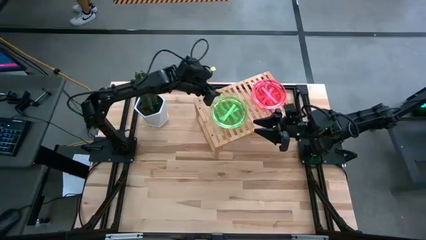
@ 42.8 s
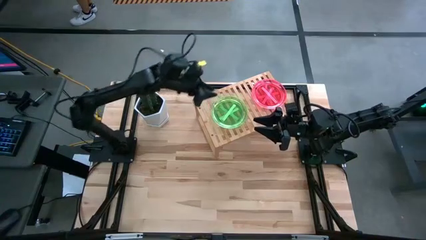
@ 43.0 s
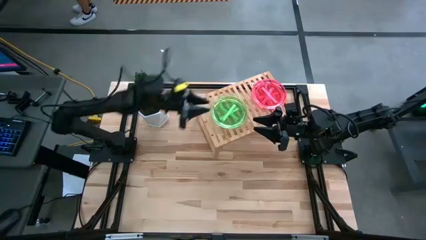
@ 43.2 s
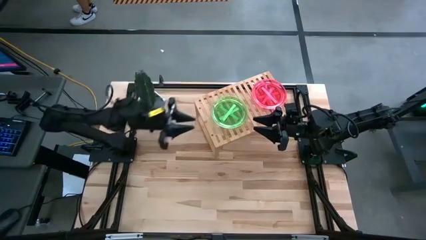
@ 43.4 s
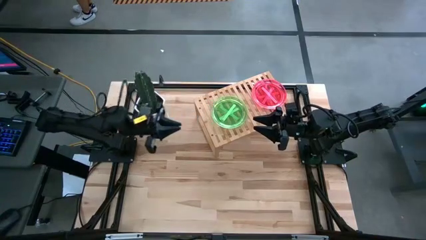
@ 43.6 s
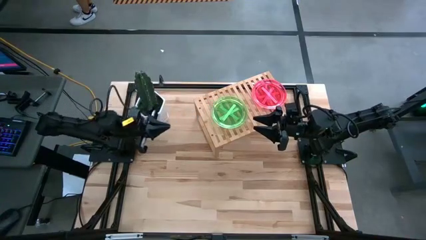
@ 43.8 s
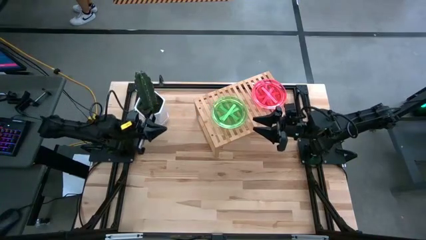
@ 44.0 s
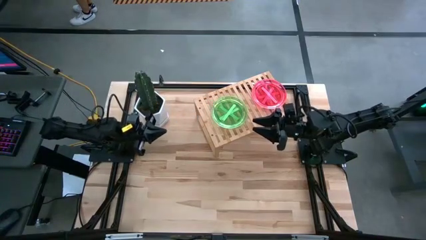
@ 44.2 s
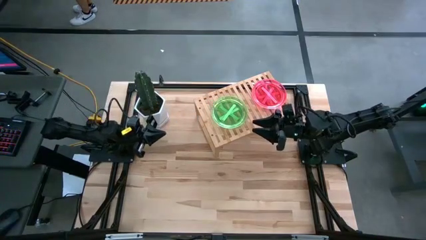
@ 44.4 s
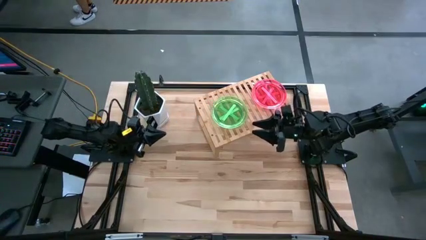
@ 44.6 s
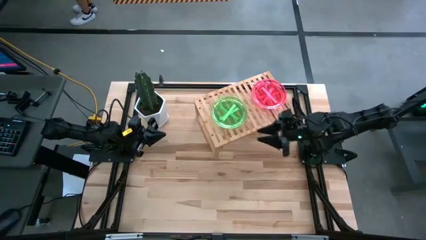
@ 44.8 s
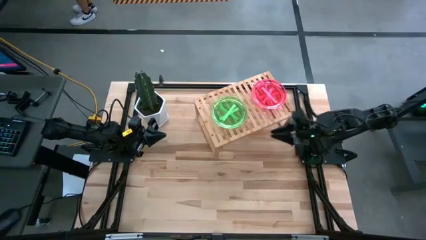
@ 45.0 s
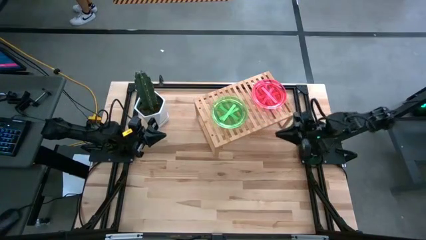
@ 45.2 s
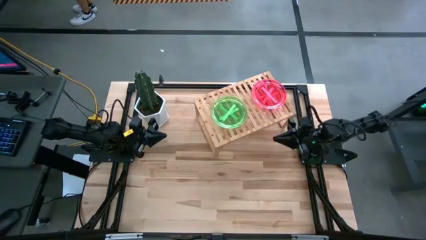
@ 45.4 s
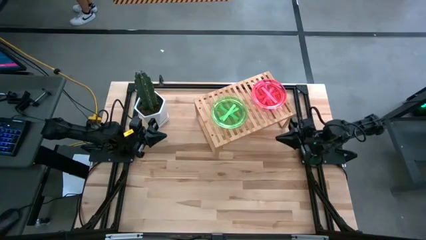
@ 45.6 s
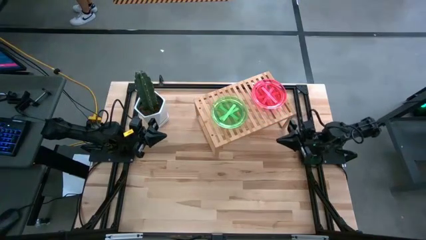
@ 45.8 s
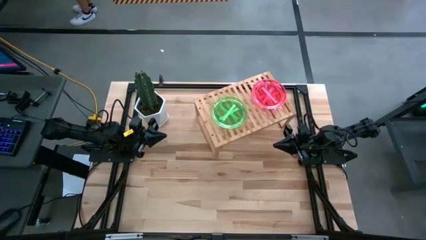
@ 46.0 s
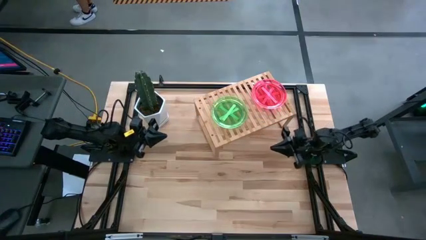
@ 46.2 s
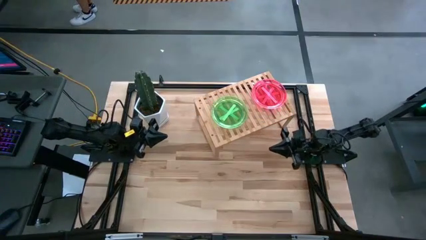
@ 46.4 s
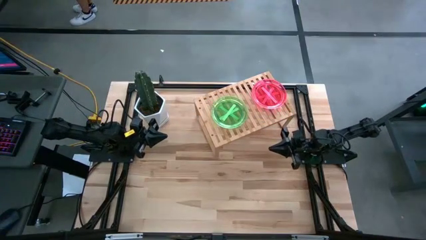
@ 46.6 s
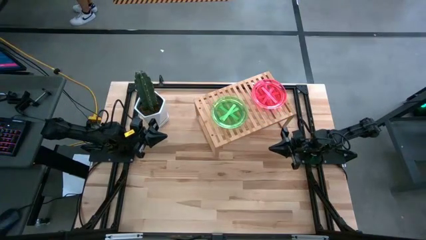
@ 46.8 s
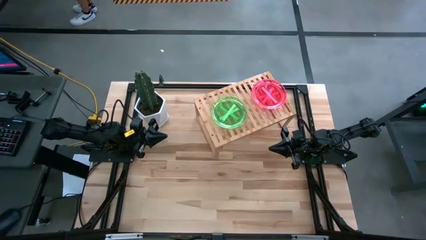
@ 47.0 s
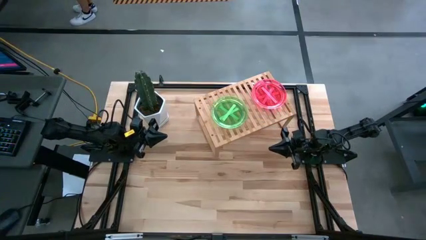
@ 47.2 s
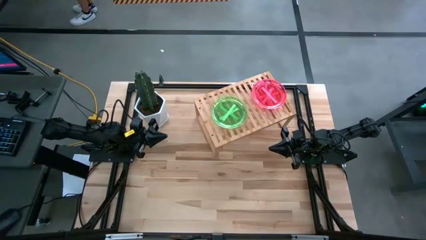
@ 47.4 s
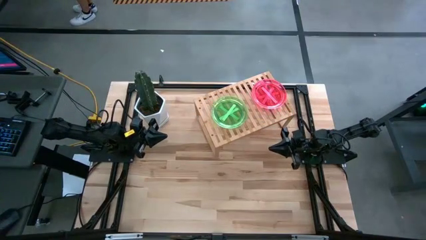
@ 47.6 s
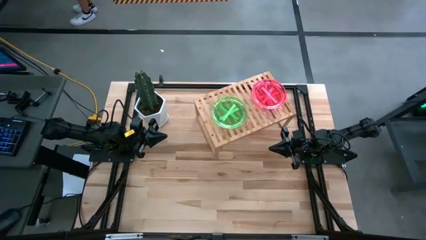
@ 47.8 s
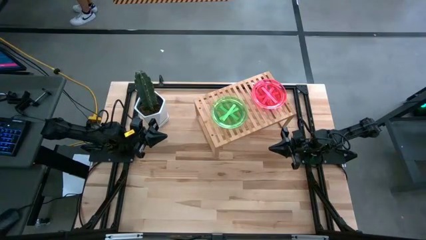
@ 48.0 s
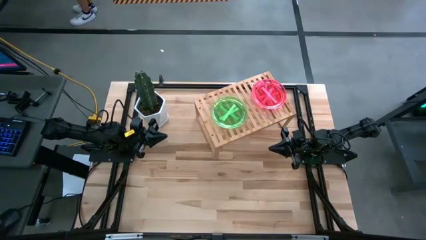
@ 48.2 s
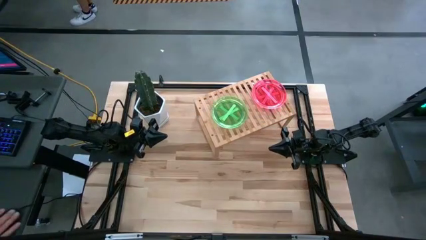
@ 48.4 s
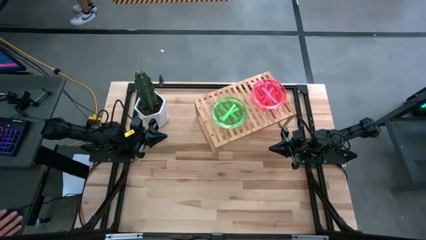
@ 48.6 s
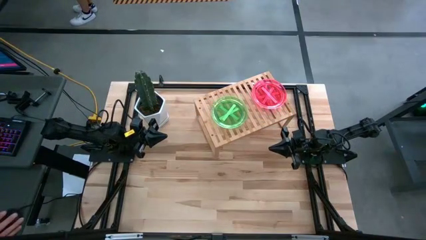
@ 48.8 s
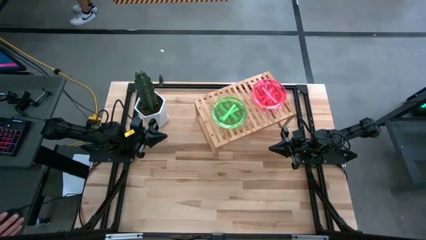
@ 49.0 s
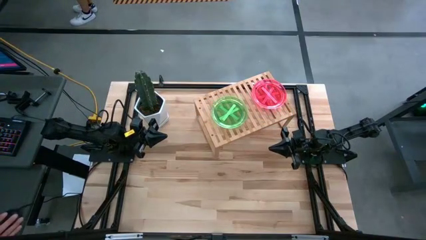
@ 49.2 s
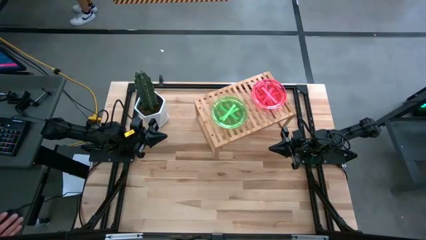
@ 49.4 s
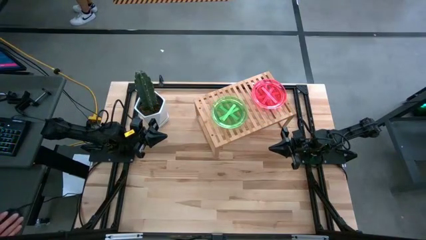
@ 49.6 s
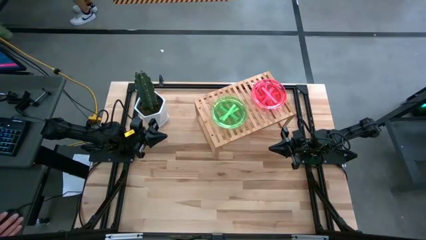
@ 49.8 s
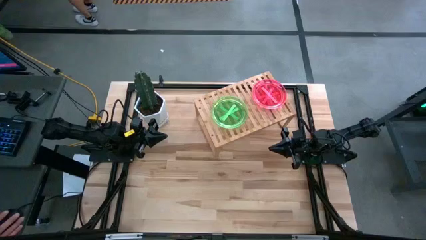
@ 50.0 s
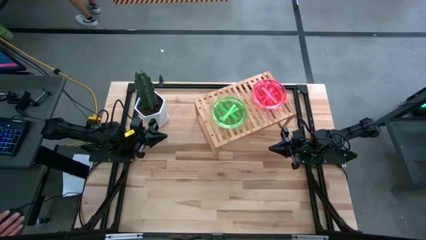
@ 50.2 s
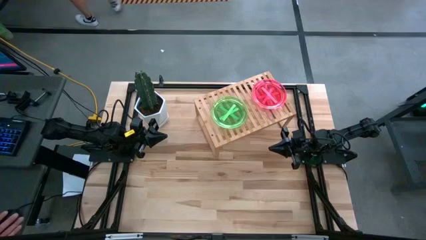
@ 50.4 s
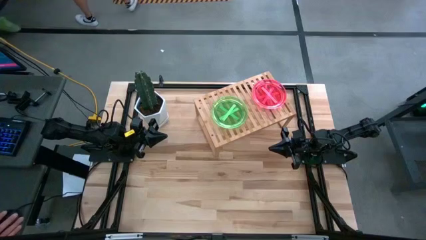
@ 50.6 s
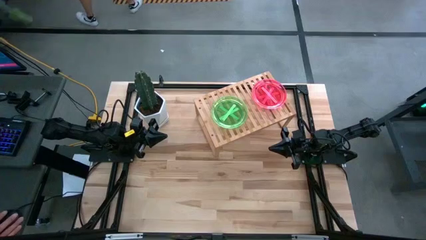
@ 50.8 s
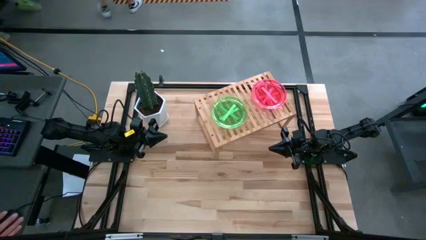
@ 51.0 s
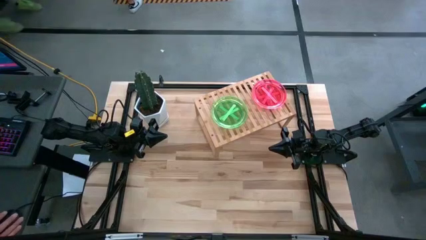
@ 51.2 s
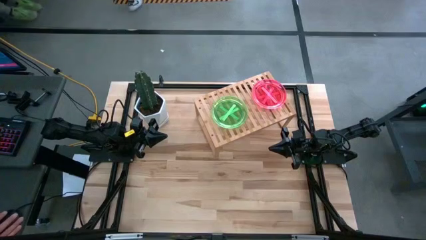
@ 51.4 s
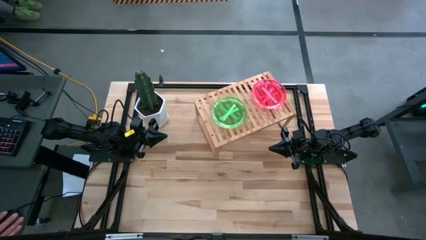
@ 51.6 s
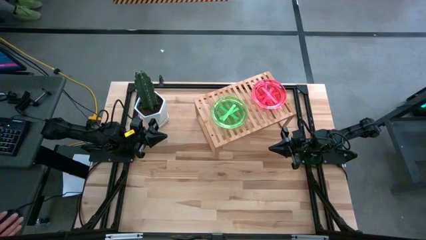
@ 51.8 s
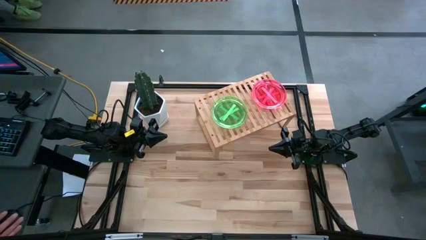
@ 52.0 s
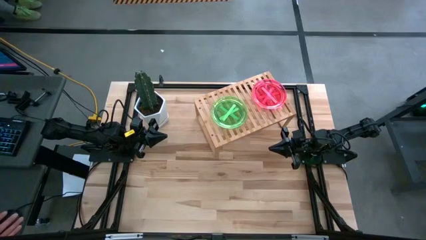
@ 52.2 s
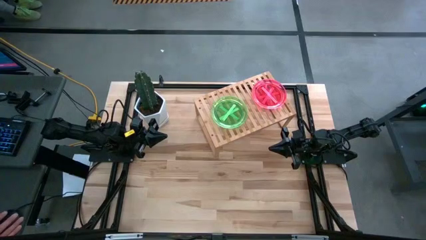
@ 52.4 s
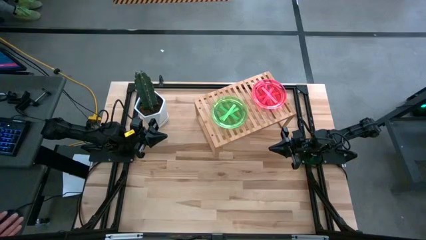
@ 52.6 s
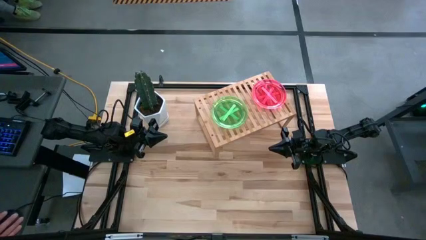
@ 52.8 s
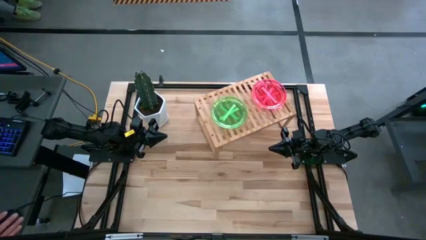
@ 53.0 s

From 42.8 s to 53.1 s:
Task: Place and stack plates onto a shelf
Return to Home Position

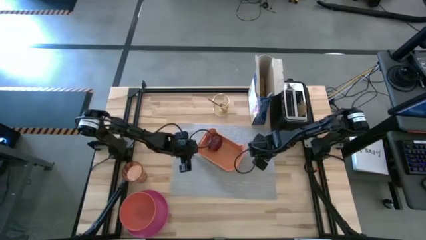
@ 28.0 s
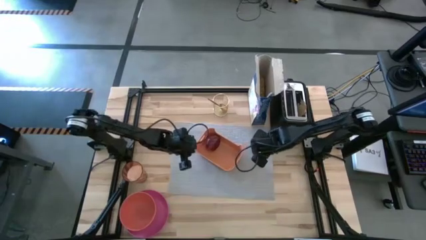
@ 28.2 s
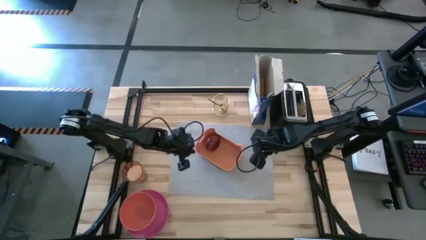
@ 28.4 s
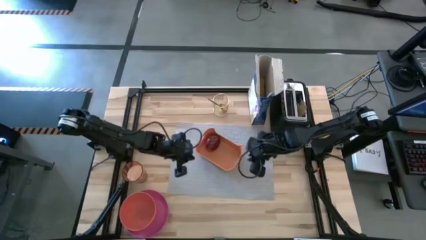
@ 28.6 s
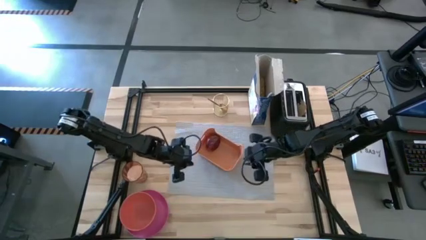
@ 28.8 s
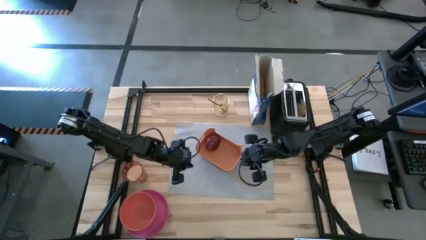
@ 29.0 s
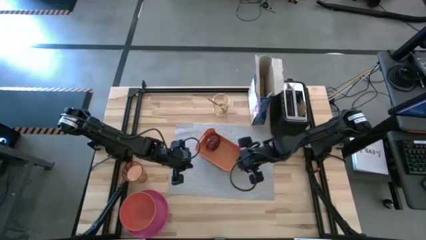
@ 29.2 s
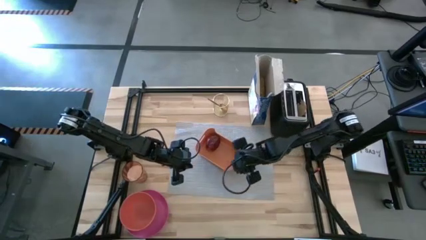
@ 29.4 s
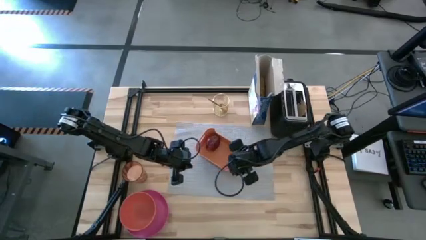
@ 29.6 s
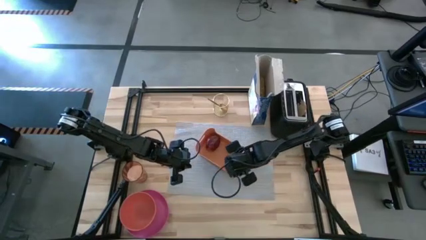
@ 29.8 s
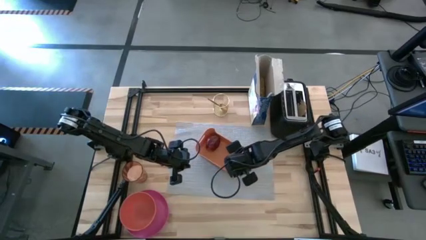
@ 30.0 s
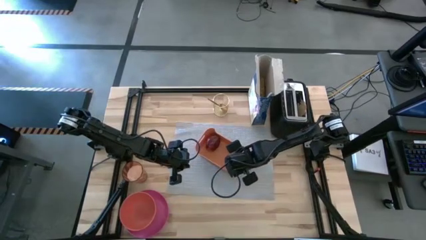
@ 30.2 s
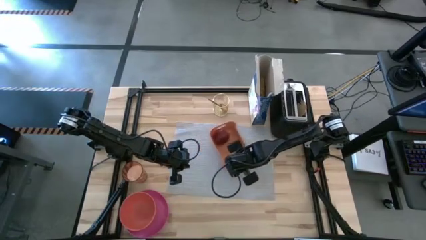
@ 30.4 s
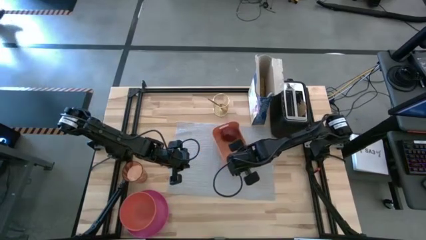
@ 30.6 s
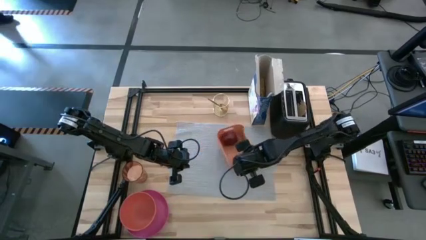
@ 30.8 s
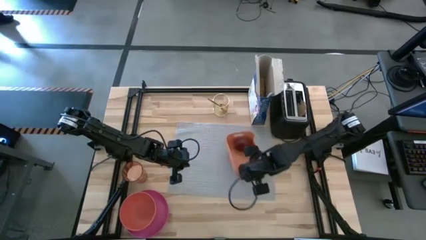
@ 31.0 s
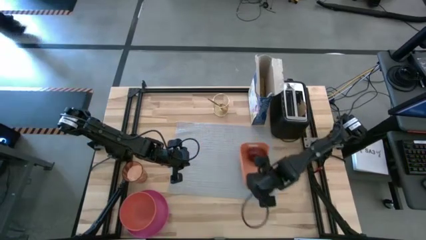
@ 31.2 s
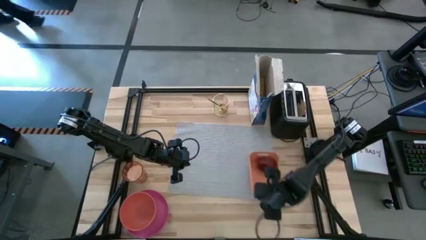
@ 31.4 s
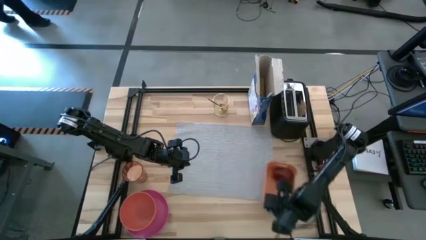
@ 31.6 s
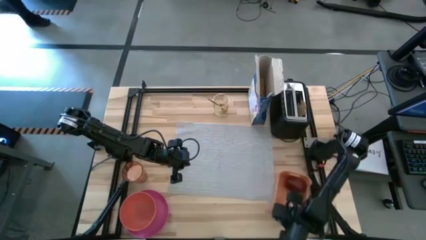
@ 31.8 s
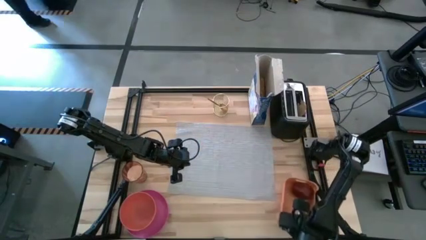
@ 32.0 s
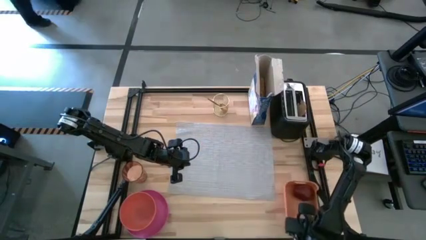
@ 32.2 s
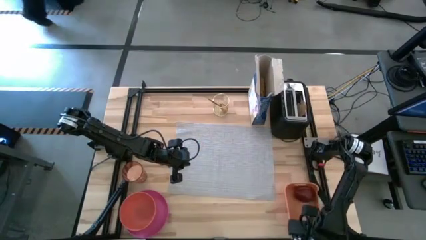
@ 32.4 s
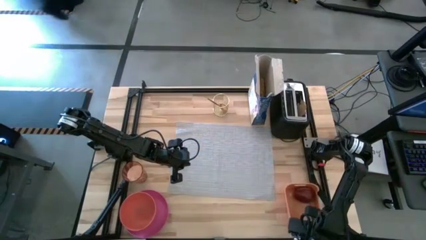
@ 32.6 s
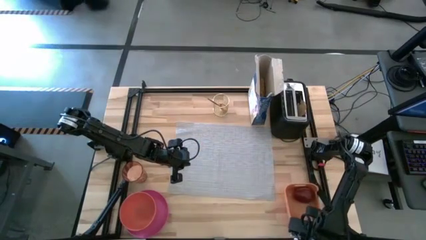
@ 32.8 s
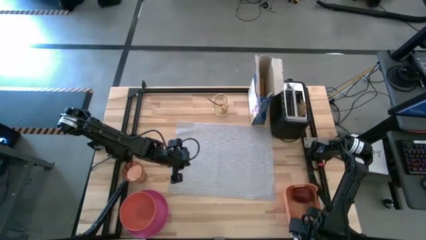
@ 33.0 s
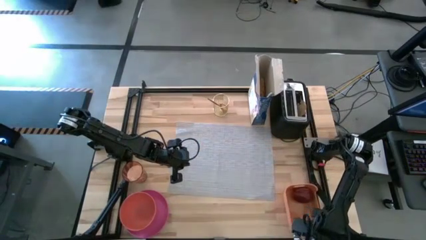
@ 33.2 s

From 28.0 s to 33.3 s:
Task: Arrange a breakfast setting
Move the orange bin into the bottom right of the table
